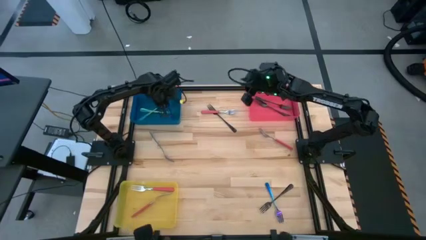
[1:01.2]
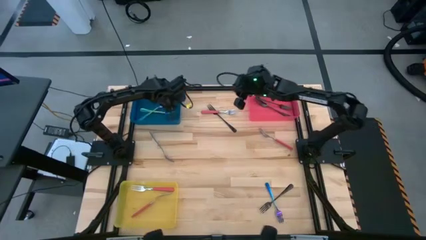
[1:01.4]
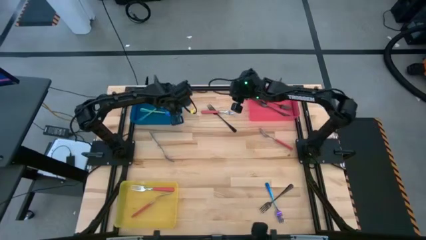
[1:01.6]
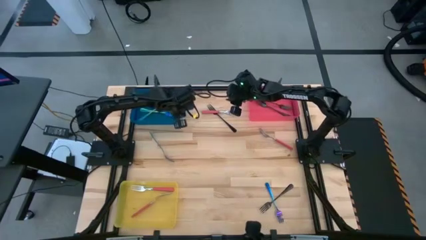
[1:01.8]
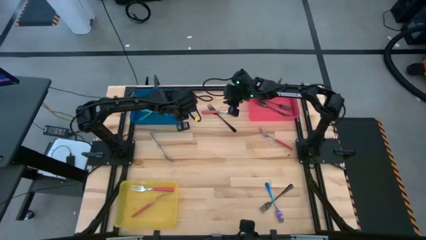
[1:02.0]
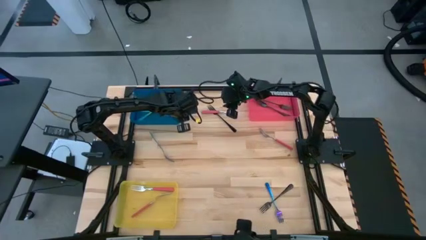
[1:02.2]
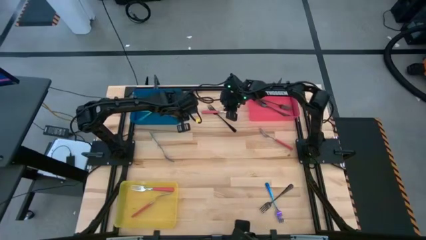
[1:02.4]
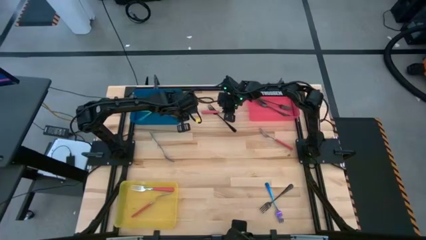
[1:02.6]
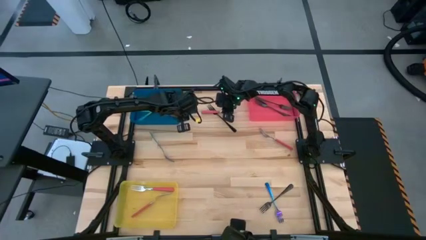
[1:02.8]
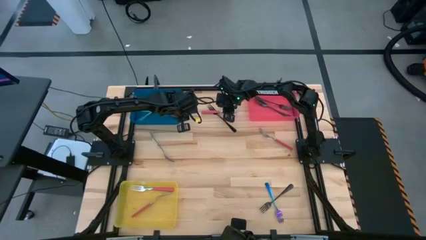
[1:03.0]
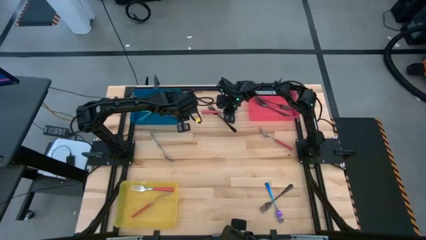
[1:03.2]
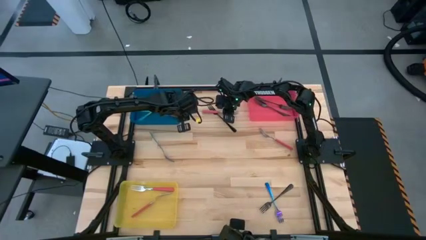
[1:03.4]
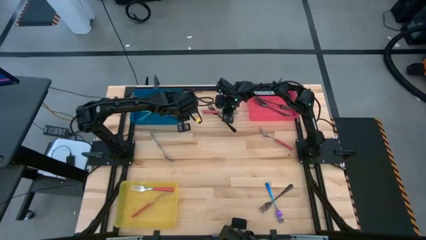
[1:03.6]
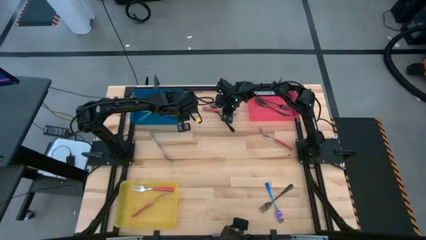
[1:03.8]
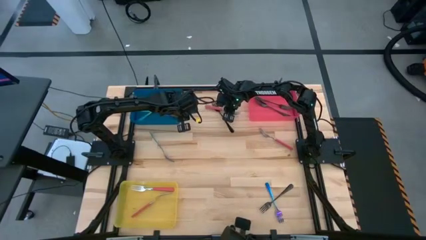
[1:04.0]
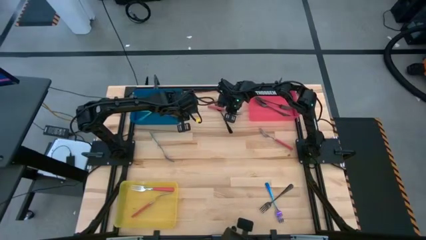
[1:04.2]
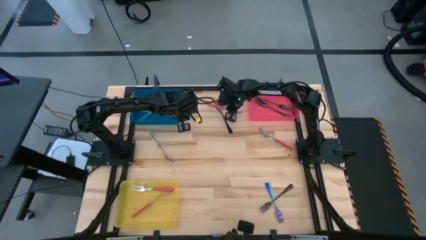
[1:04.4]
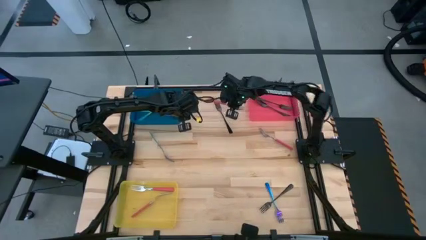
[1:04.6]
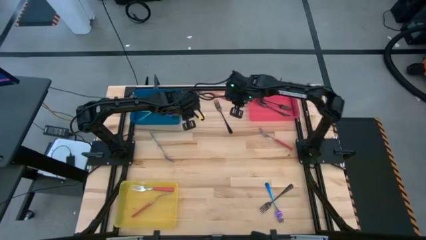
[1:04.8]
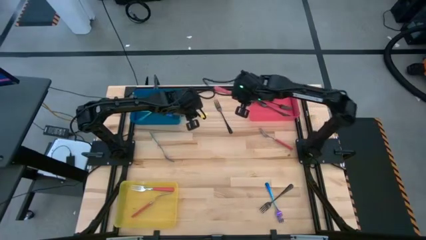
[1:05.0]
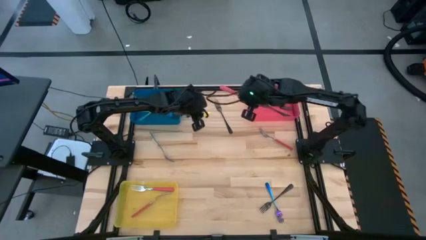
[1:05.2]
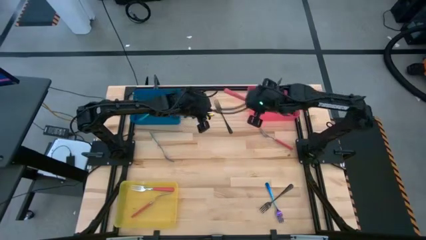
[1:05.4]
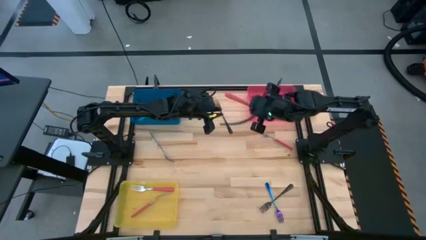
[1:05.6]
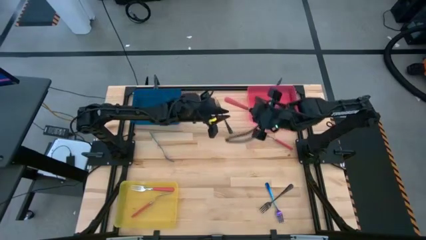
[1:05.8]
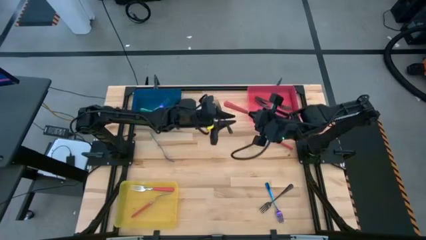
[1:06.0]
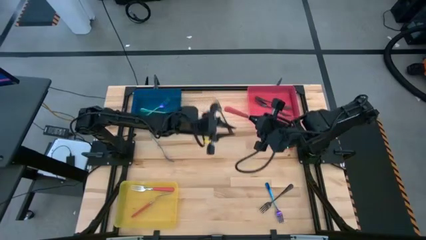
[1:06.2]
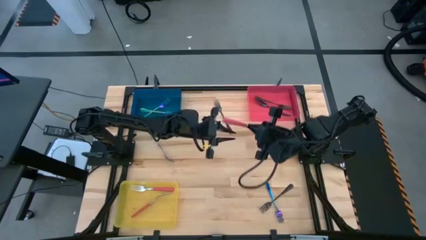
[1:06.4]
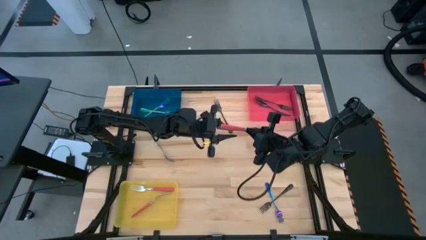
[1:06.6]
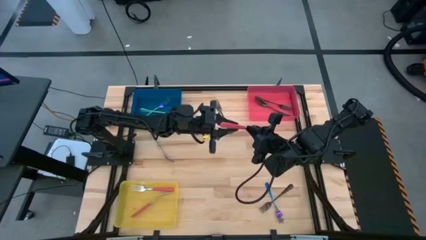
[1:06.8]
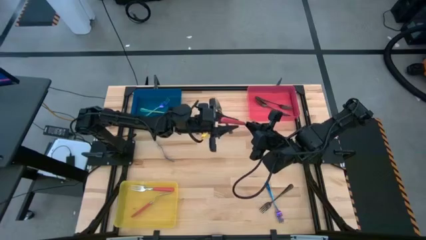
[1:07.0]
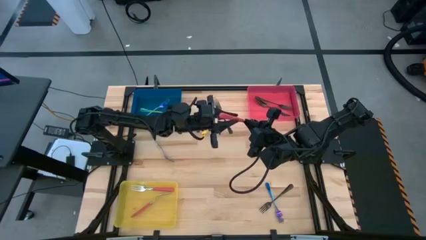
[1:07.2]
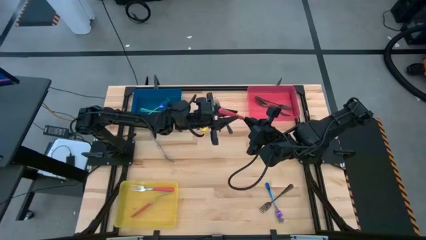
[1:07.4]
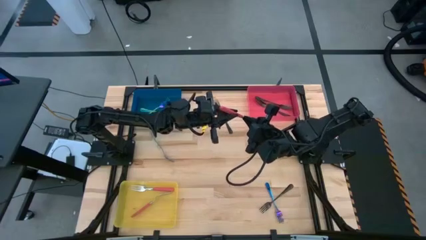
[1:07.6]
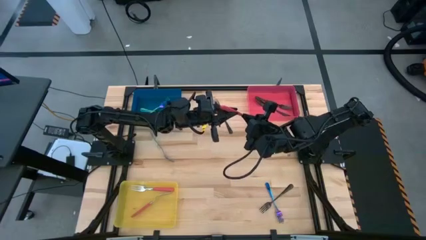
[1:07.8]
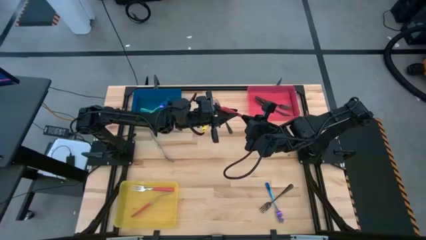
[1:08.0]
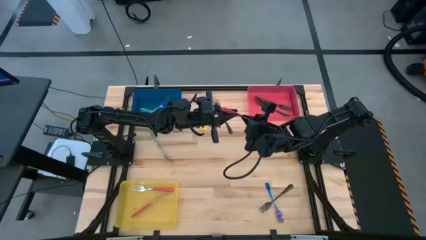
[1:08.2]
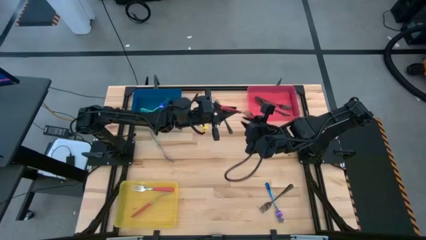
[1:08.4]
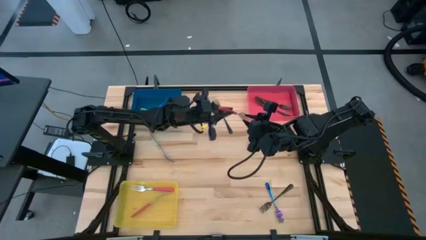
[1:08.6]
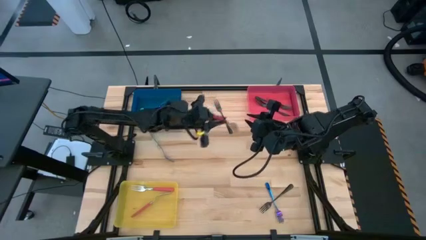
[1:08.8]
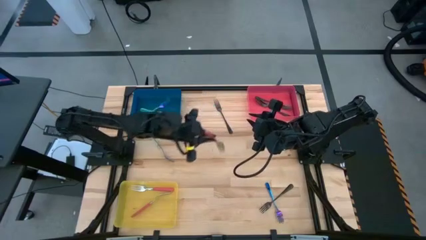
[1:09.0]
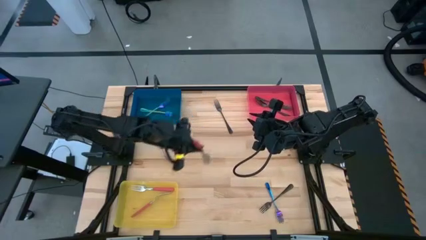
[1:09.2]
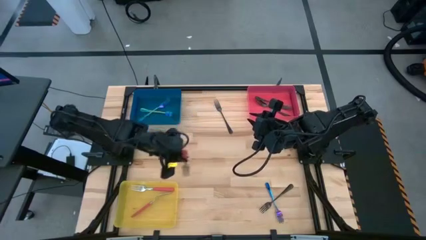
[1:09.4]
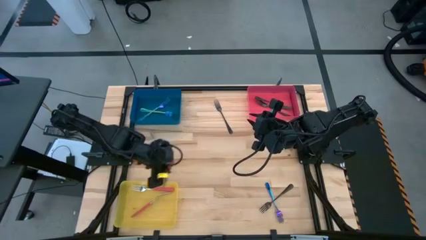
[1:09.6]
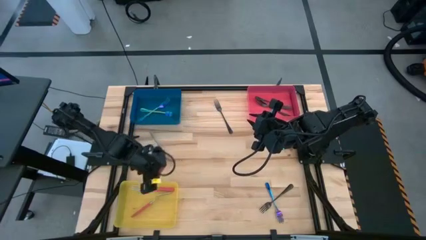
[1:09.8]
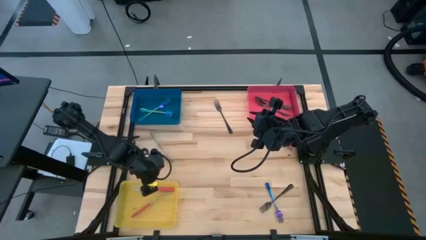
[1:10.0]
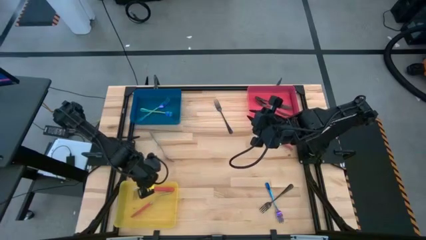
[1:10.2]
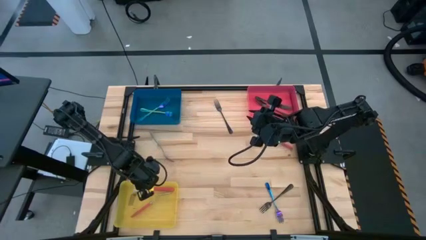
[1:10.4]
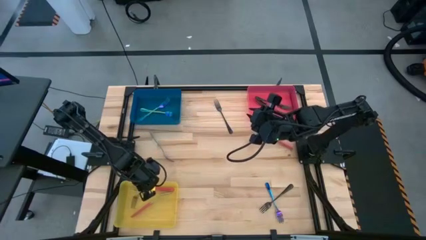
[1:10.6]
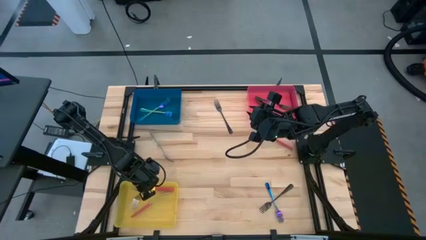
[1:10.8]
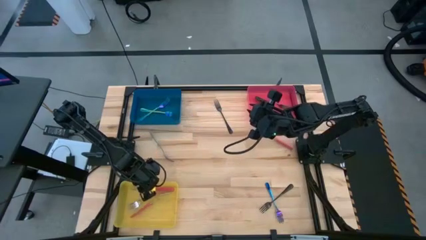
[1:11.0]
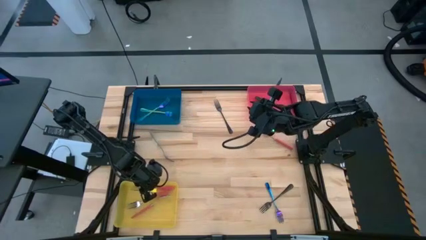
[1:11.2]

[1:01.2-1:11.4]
Task: Sort silverware by color (type)
Put the top pink fork into the yellow bin

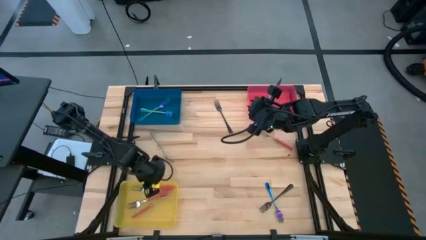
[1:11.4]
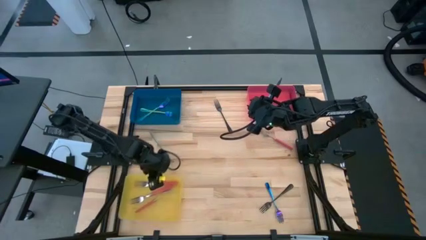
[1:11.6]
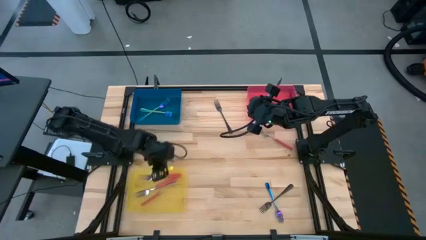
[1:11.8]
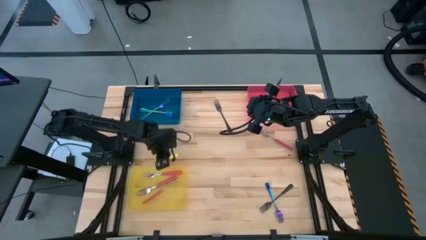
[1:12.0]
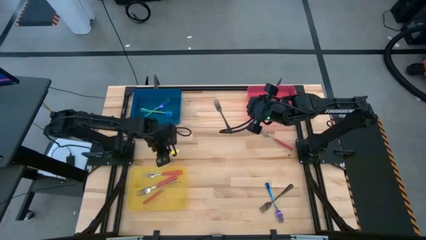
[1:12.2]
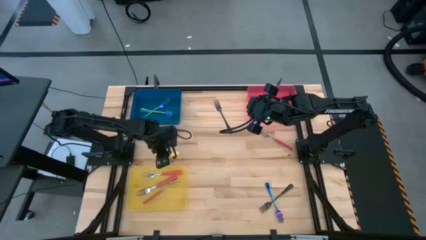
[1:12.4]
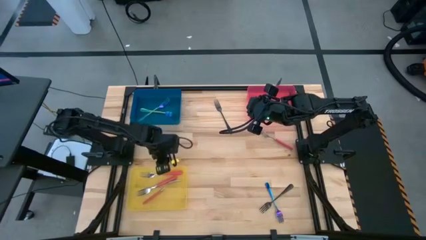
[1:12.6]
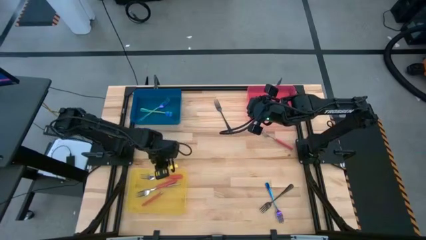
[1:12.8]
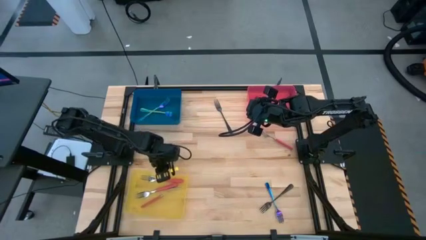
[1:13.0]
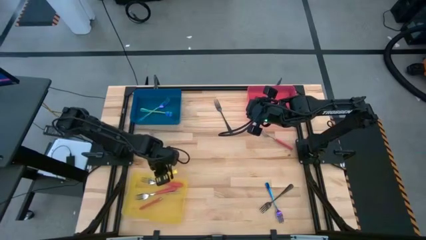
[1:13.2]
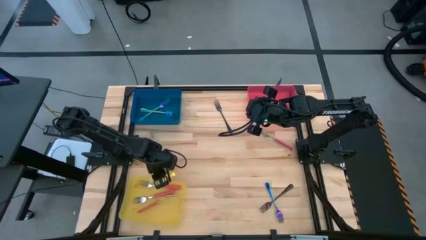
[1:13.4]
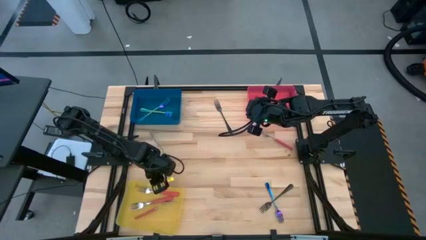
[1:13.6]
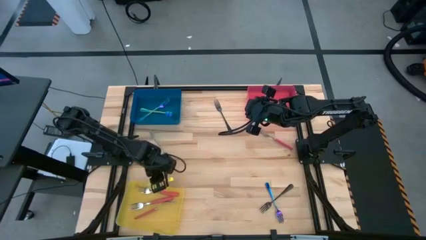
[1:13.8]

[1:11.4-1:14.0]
Adjust the yellow bin

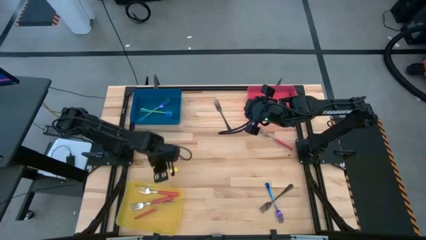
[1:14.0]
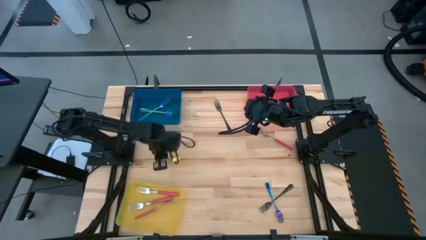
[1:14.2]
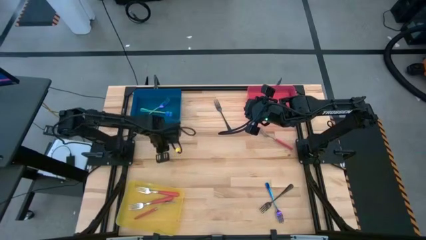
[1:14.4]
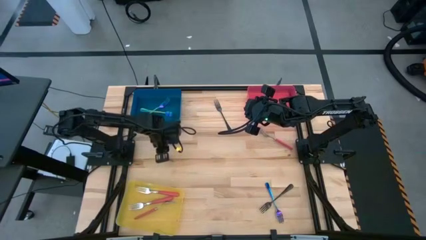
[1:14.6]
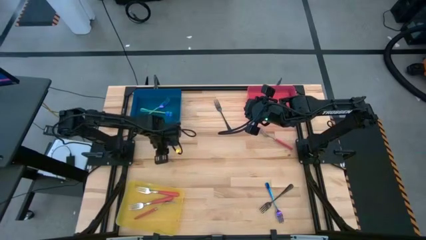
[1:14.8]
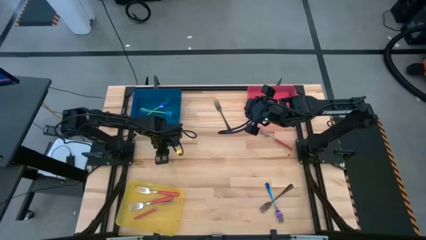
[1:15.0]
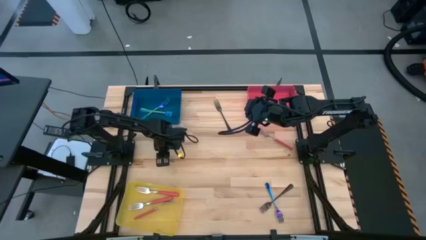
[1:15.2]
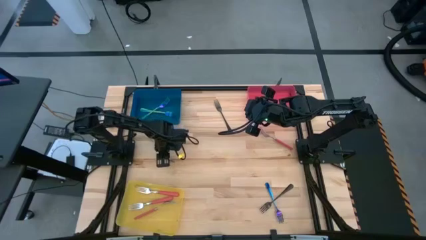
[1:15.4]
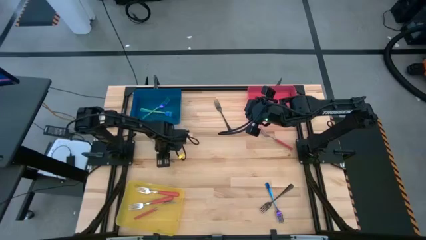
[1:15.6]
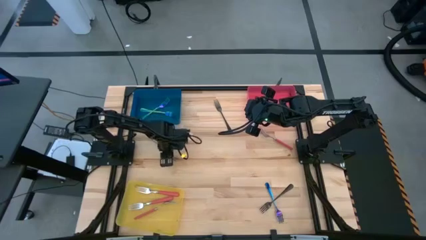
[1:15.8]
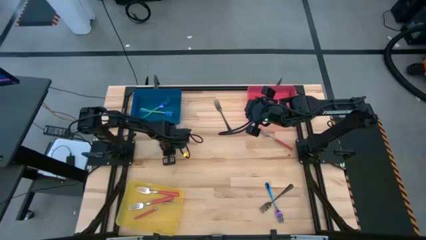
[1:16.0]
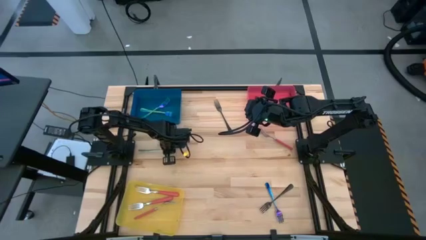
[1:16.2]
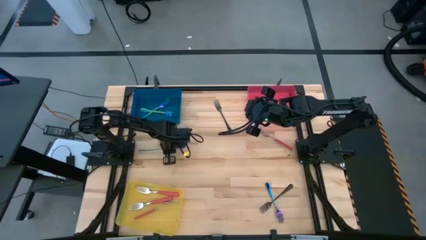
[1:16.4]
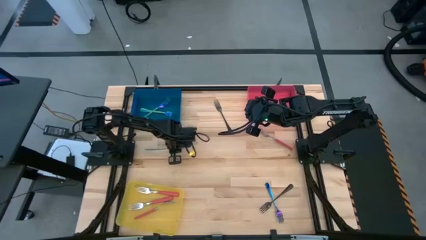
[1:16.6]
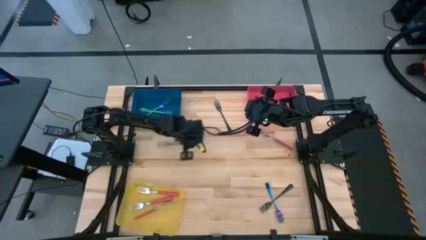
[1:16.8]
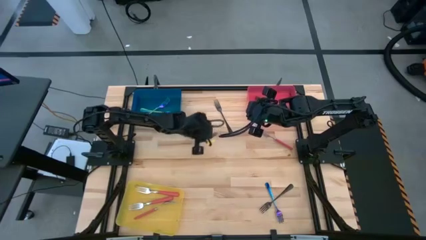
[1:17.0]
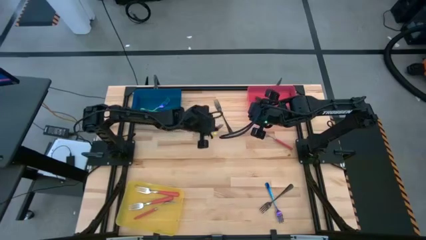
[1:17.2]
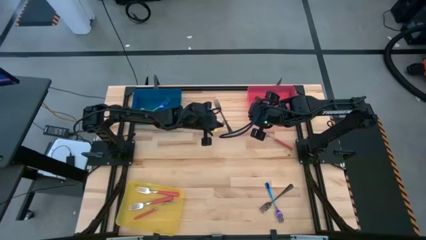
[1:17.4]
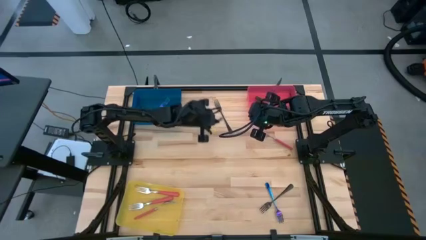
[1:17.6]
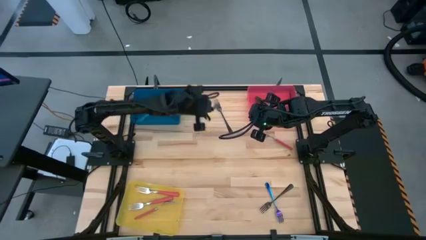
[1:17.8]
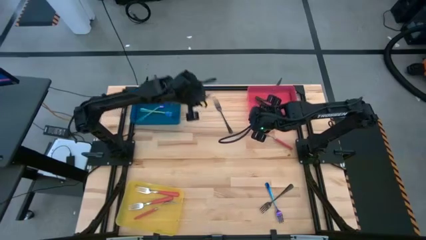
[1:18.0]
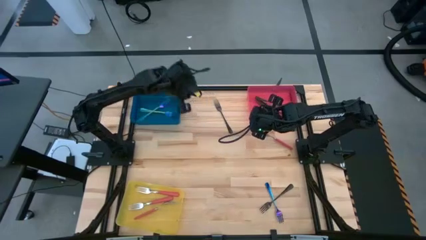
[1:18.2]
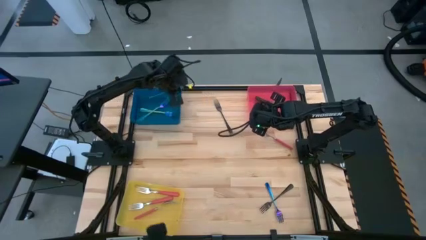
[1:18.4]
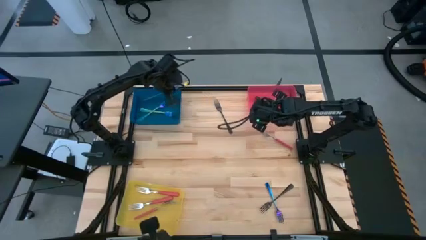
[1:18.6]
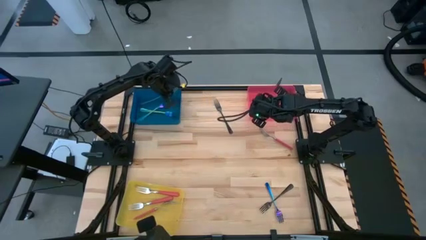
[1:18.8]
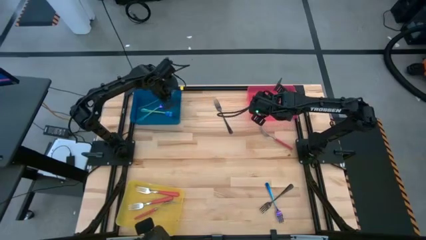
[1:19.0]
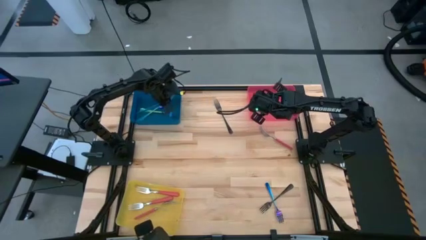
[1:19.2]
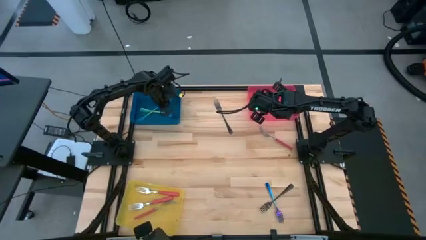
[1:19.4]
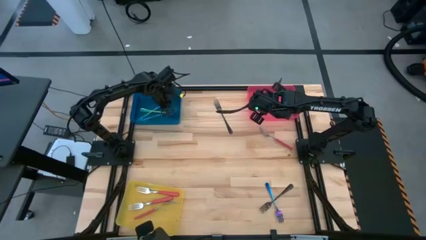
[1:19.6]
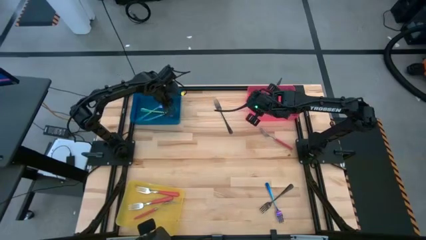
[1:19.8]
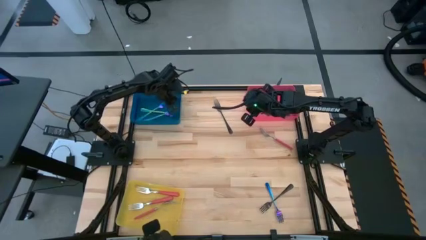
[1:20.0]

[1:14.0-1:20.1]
Put the left iridescent fork into the blue bin
